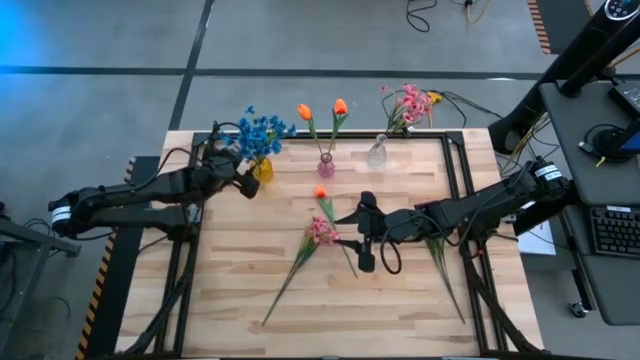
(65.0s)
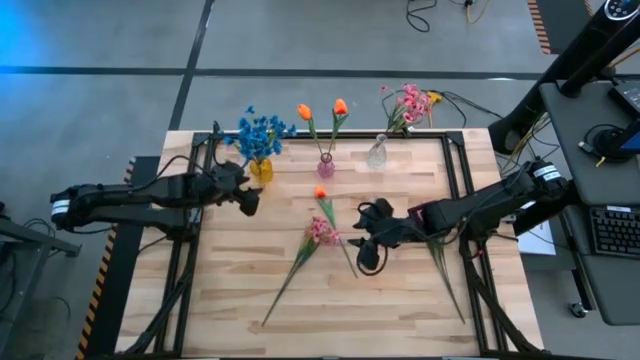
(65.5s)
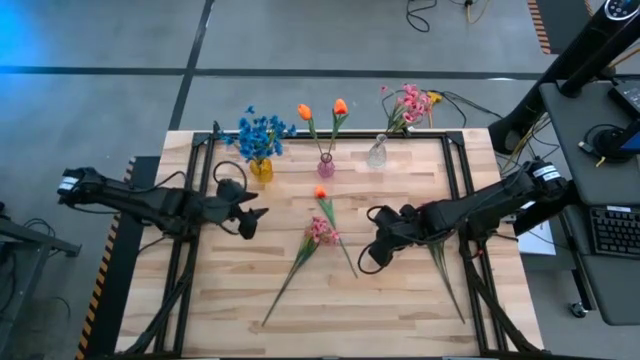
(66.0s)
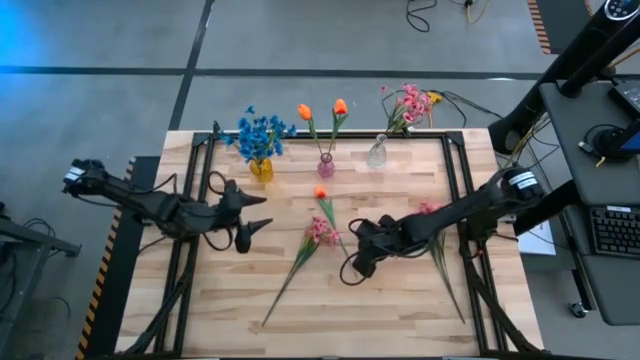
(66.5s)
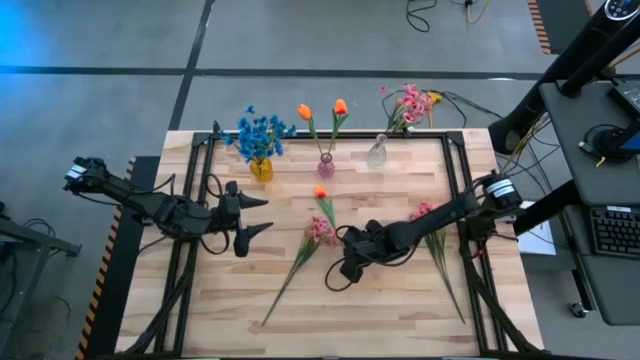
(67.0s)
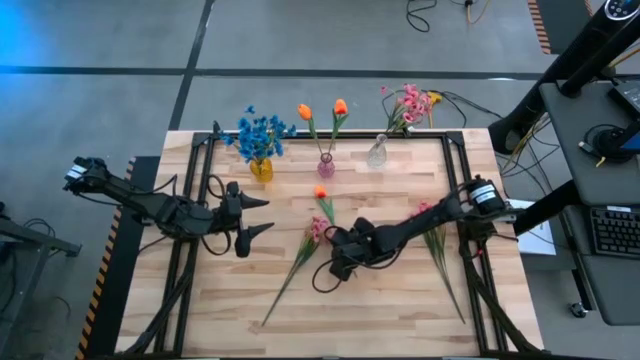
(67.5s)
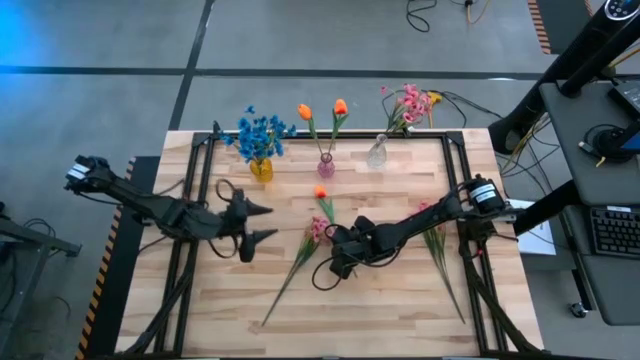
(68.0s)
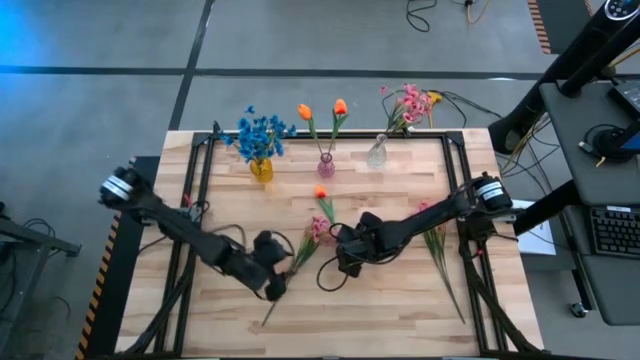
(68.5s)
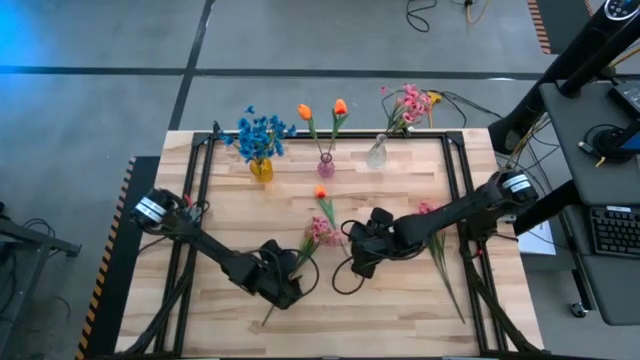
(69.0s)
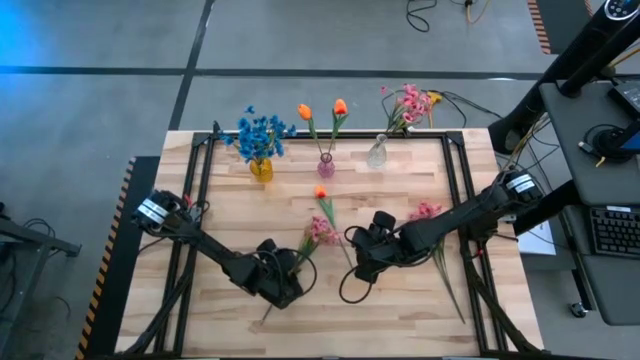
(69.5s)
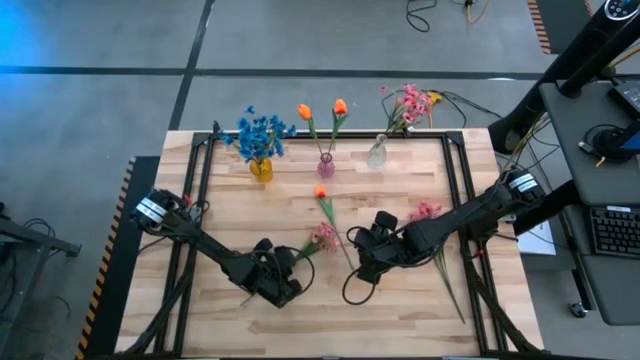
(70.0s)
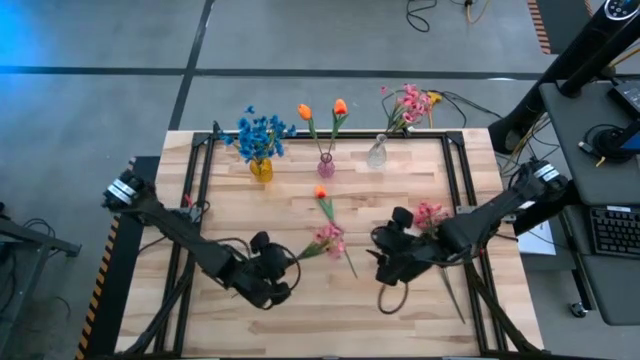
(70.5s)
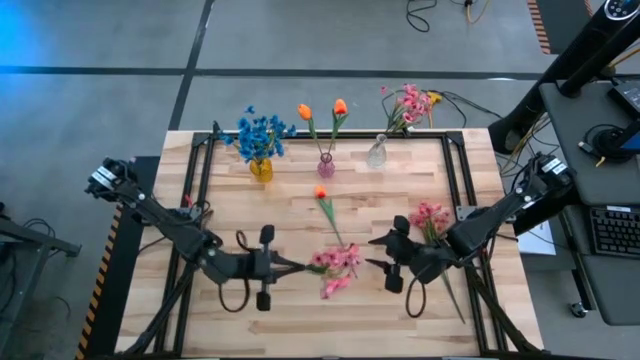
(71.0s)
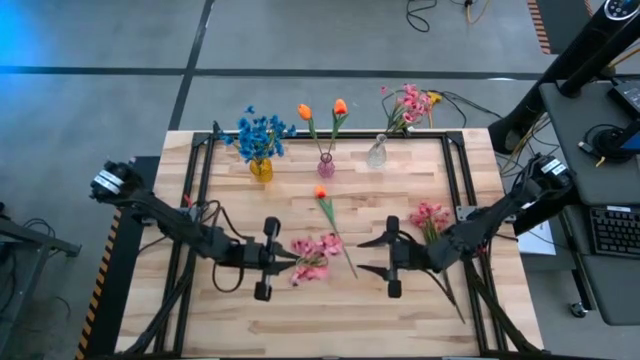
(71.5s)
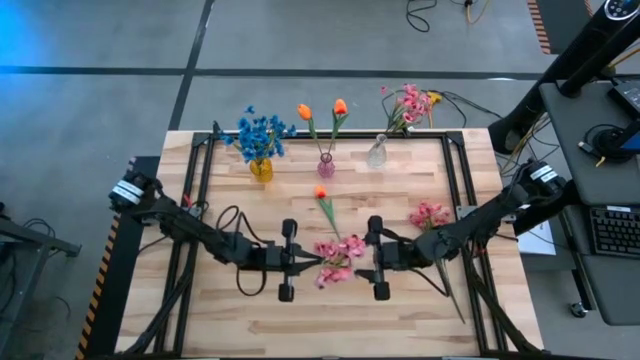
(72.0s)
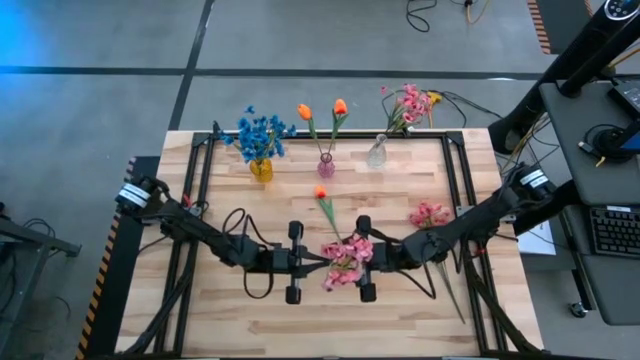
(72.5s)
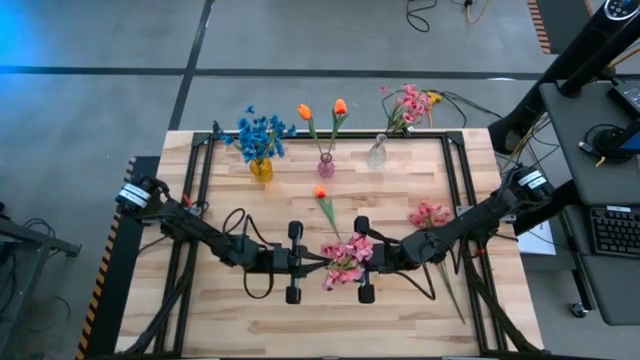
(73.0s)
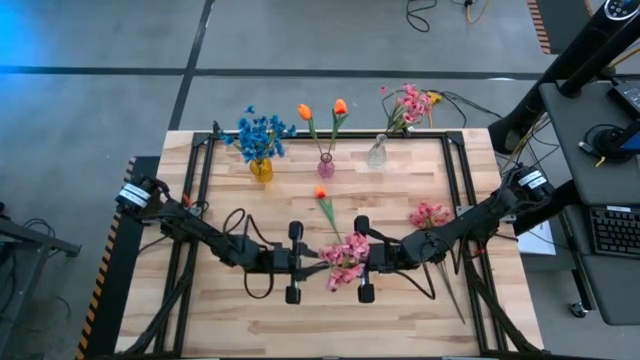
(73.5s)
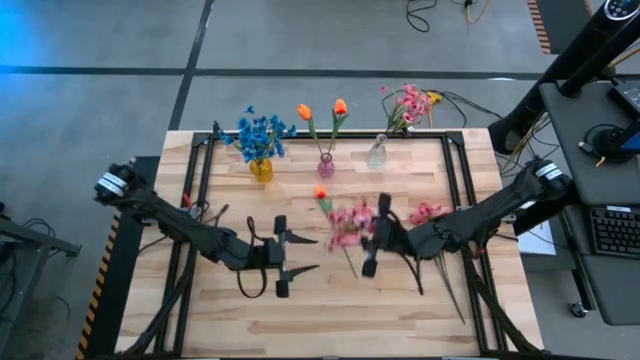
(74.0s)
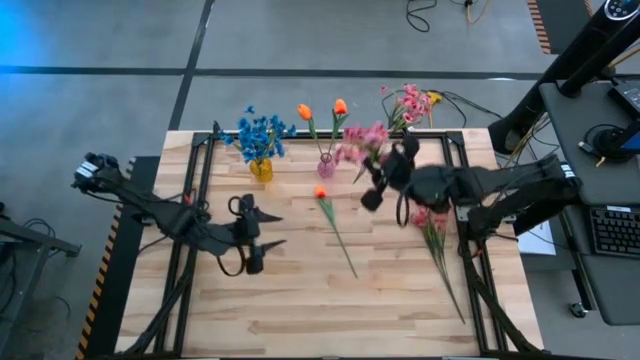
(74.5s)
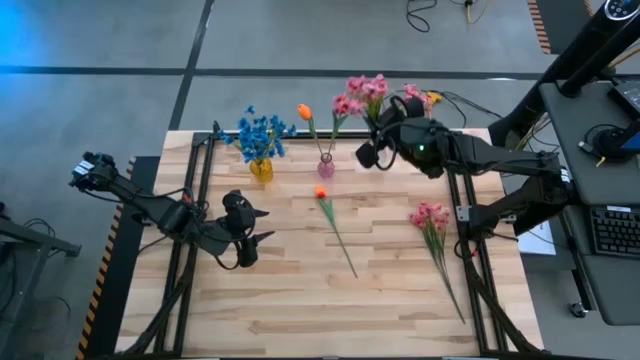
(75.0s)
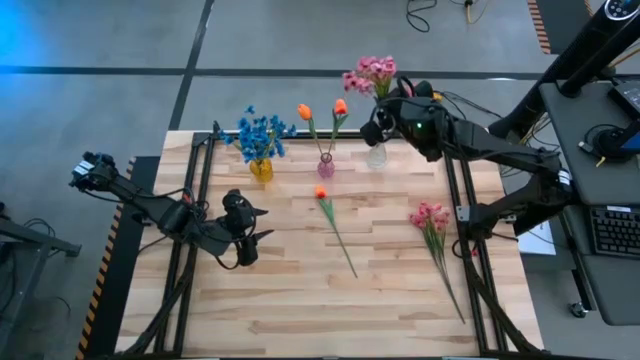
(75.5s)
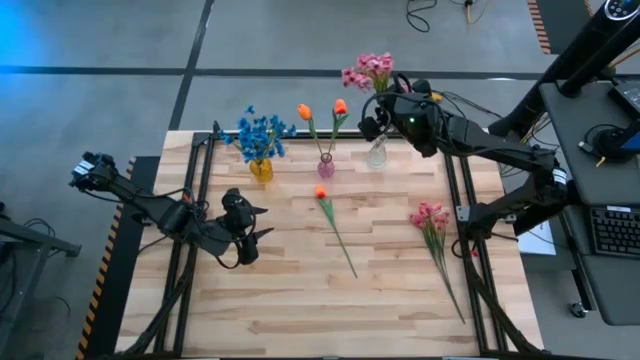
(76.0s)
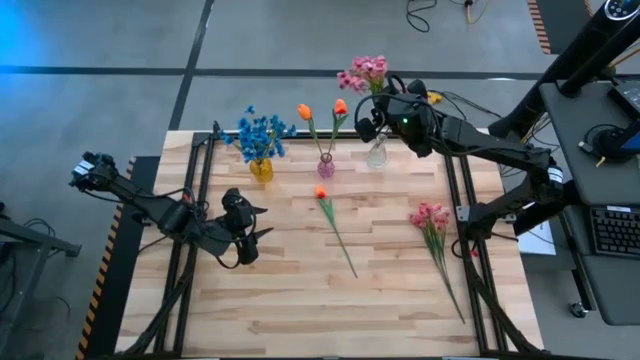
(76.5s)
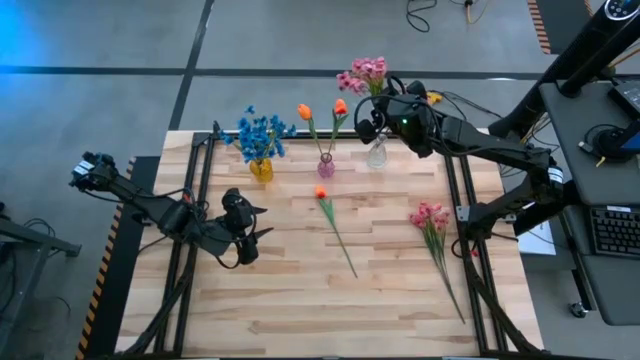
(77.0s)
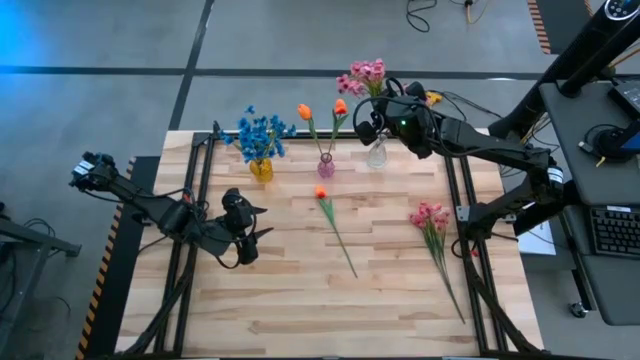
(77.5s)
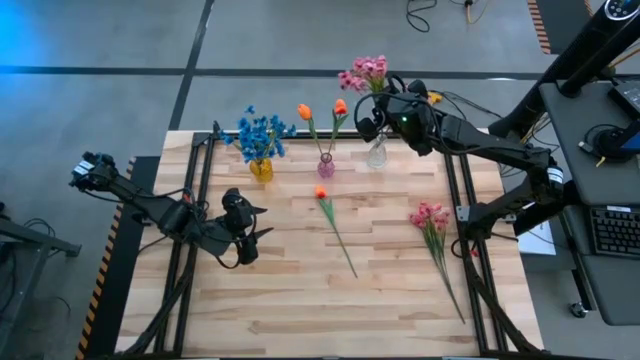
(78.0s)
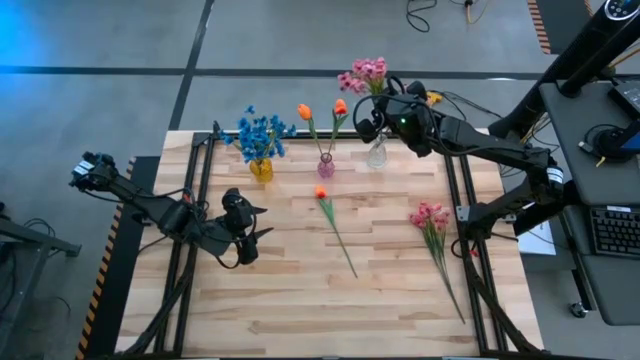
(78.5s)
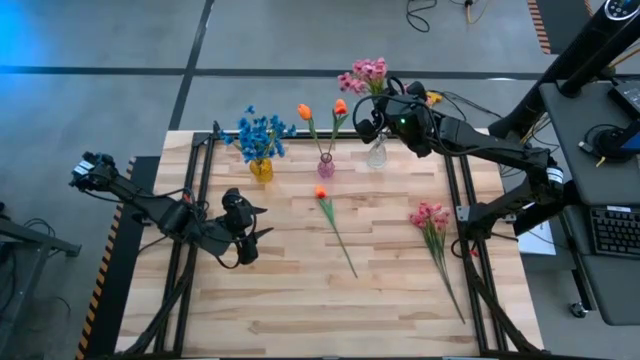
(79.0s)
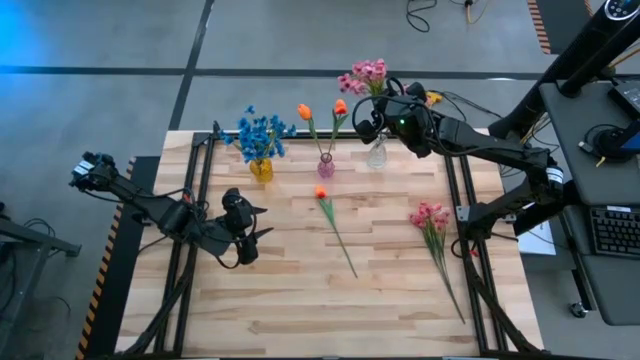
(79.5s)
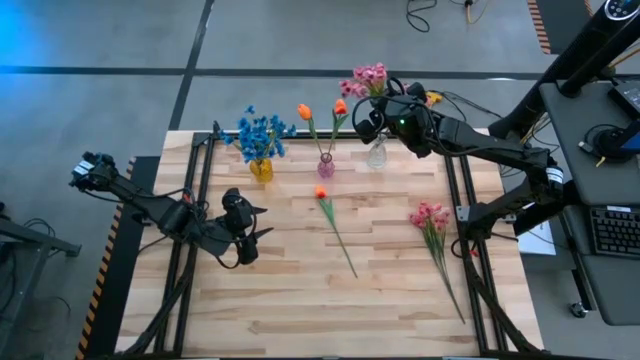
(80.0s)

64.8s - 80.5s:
Task: Sort flowers into vase by color
Put the left pink flowers into the transparent vase
